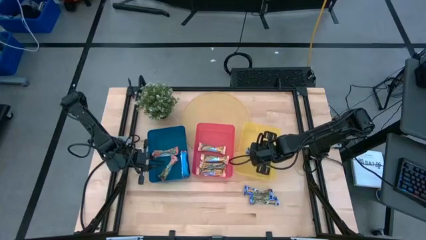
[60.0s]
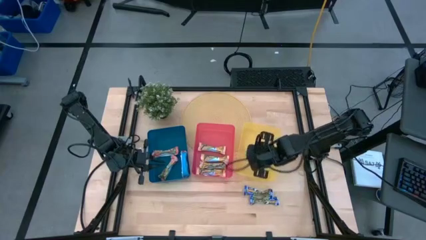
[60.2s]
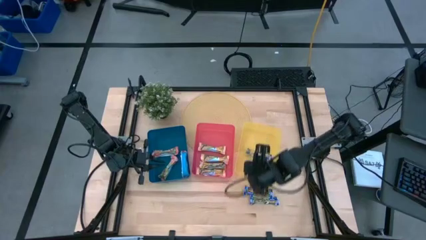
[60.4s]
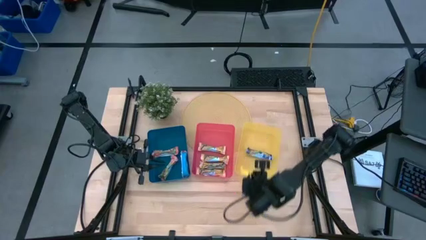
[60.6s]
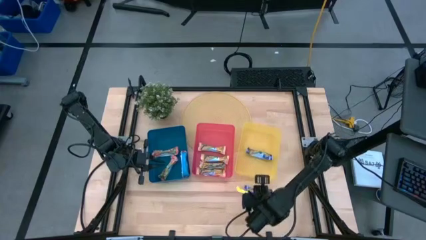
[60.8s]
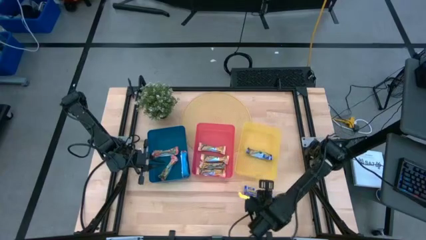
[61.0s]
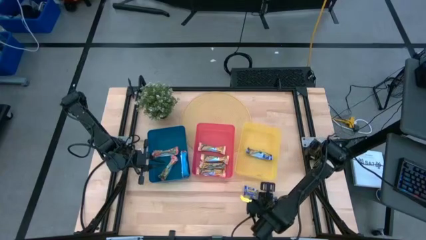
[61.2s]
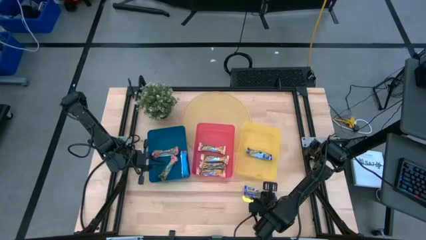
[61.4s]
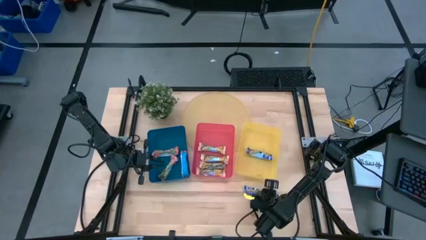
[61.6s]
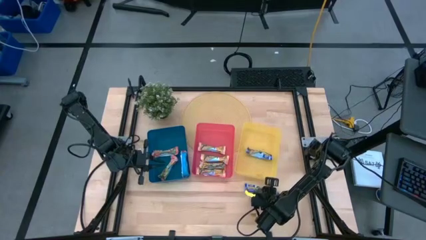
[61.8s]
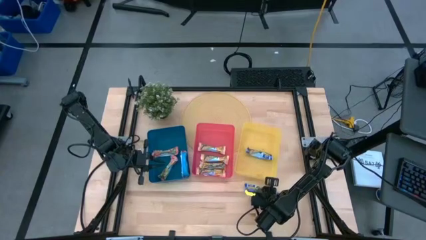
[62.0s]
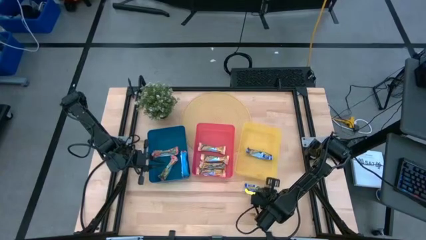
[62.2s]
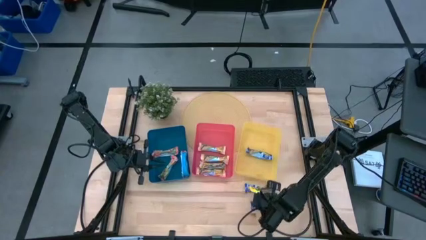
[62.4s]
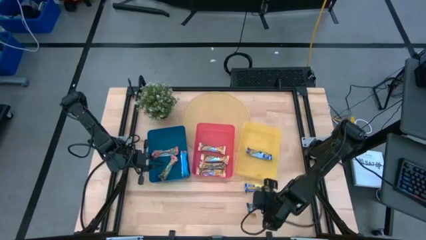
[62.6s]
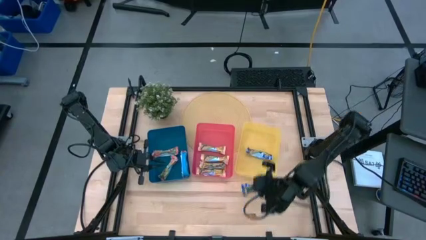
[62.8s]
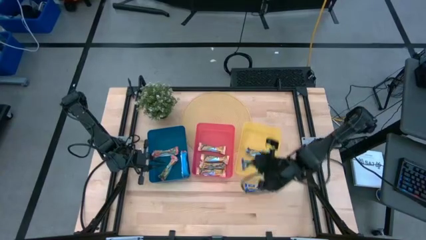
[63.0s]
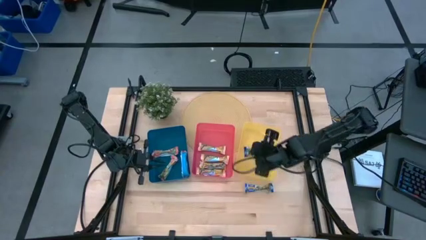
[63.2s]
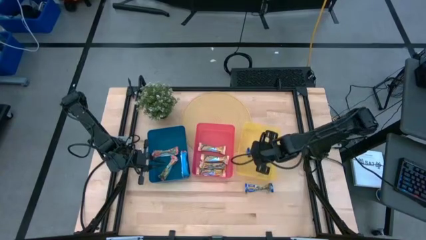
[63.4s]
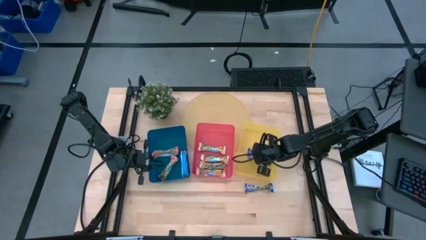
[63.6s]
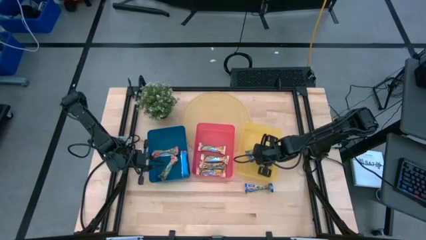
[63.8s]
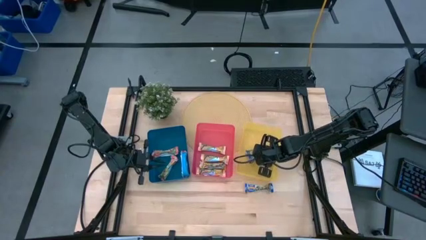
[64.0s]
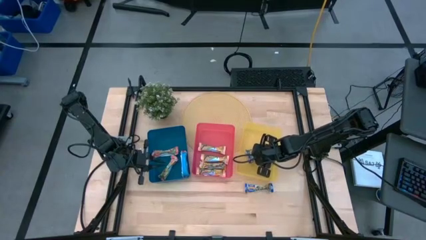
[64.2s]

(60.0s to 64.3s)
Task: Pick and place Granola Bars by type
Put the bottom blue granola bar into the yellow bin

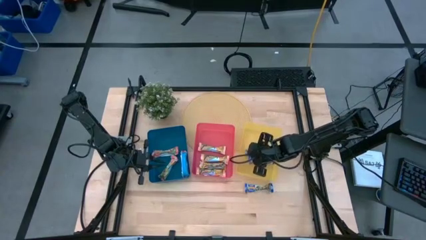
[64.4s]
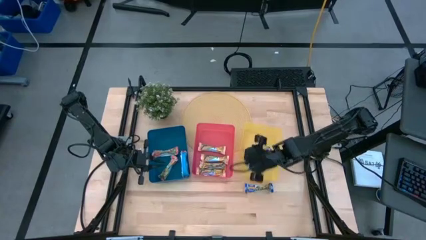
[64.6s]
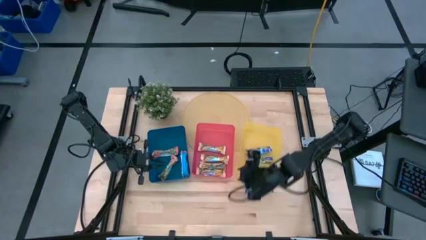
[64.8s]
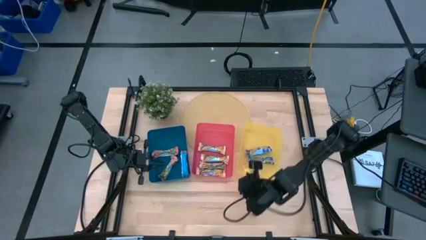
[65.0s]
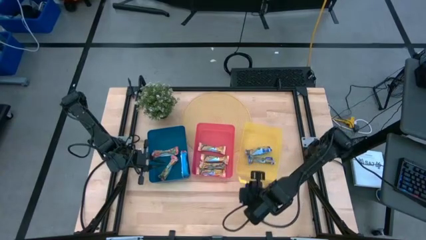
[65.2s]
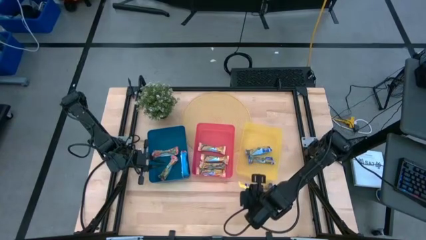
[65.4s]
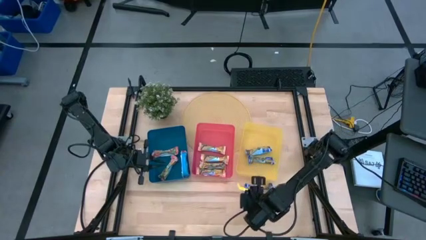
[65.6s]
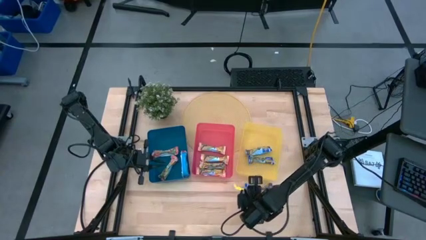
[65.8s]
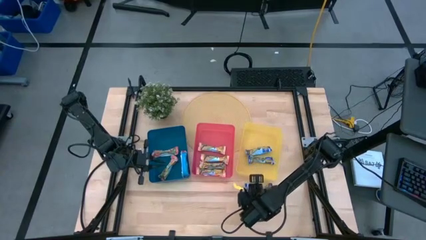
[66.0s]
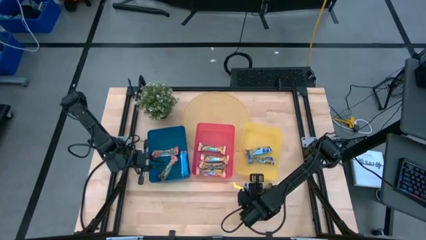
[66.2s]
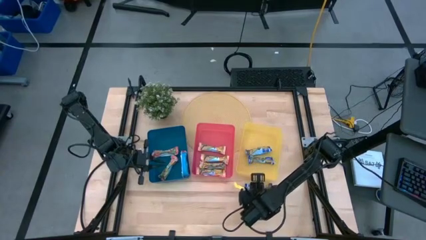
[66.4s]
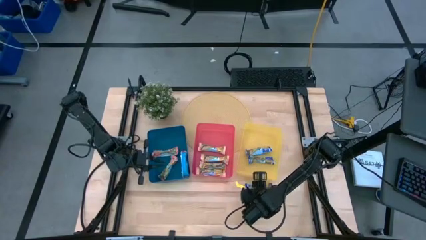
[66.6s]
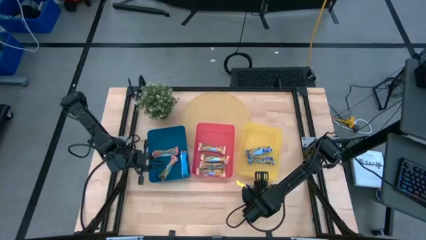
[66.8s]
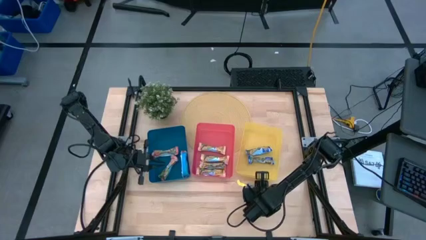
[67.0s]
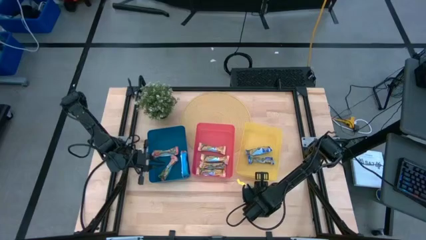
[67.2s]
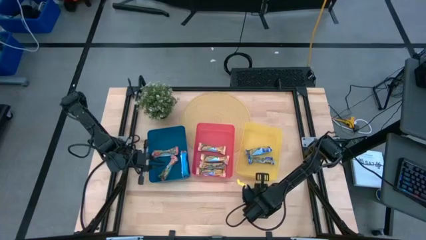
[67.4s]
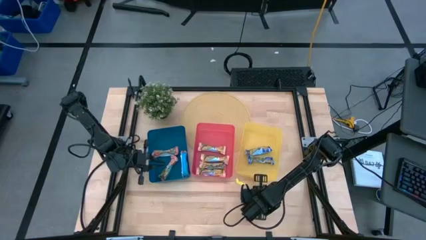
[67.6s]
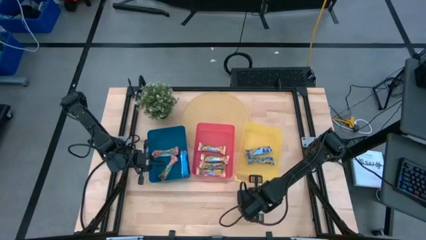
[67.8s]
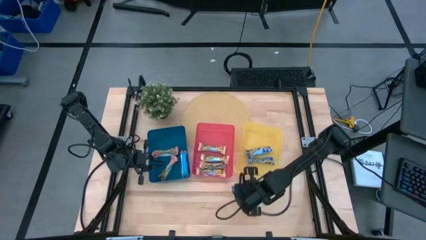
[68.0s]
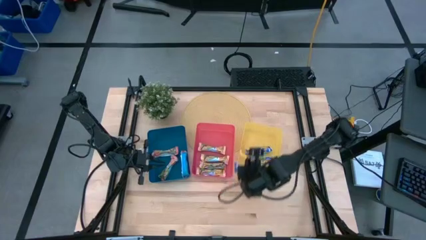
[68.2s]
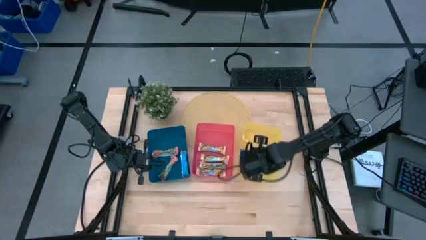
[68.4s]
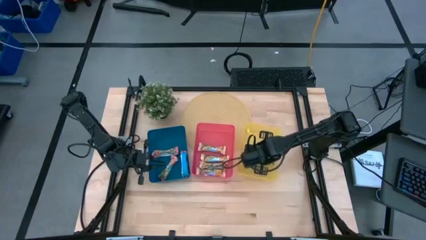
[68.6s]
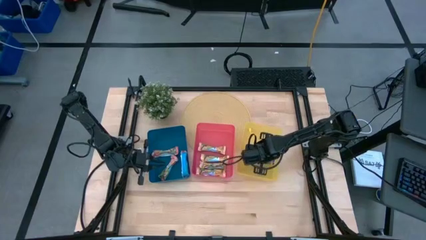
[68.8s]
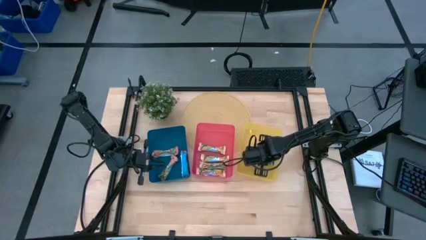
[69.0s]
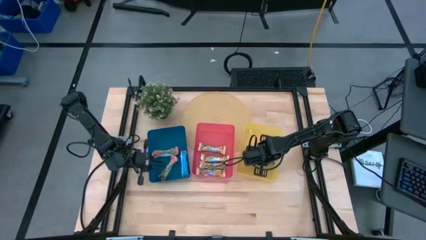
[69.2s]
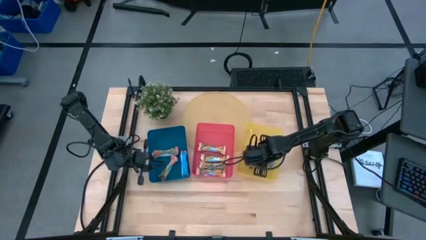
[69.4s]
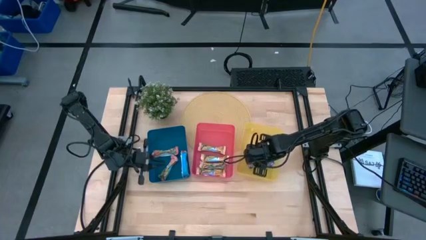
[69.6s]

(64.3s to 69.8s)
Put the blue granola bar into the yellow bin

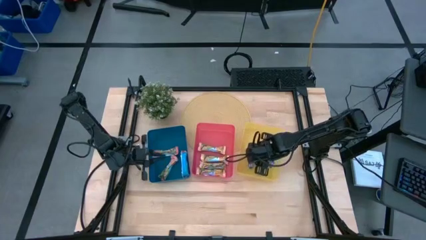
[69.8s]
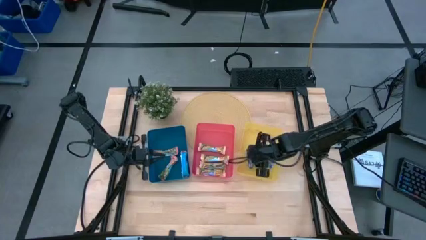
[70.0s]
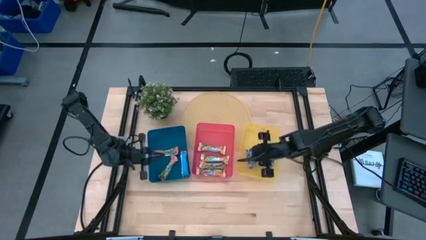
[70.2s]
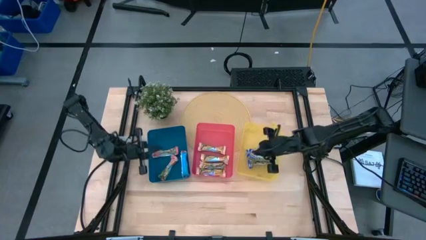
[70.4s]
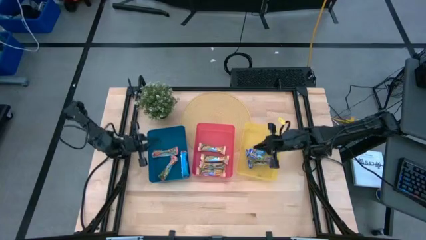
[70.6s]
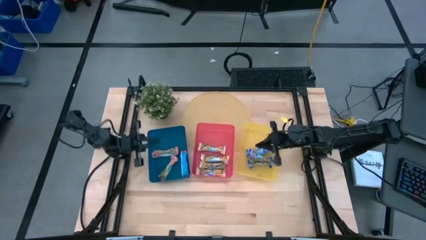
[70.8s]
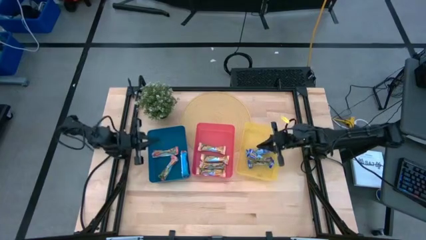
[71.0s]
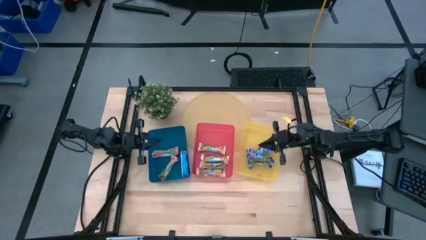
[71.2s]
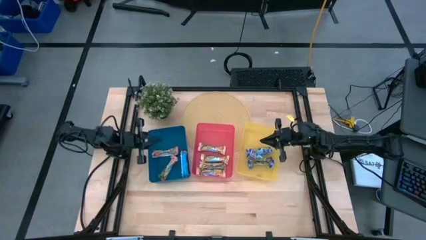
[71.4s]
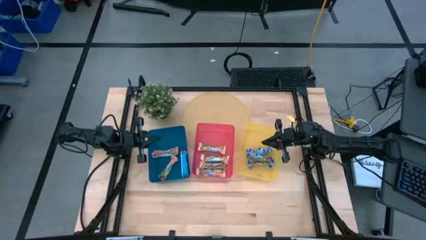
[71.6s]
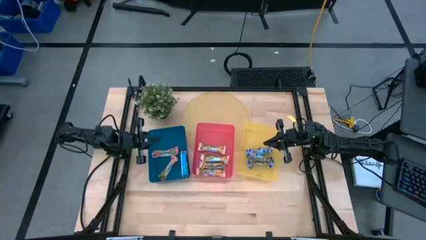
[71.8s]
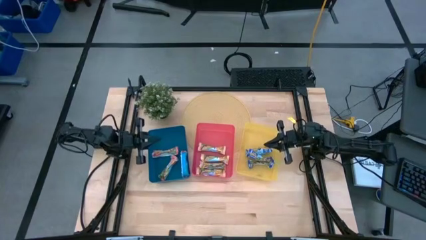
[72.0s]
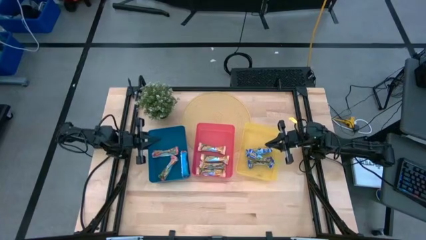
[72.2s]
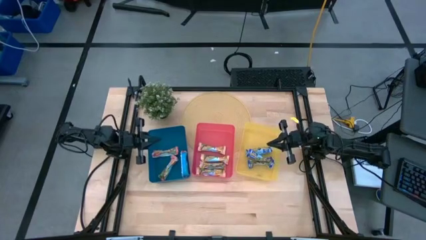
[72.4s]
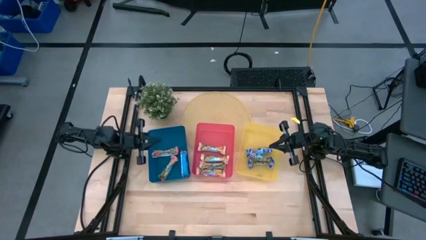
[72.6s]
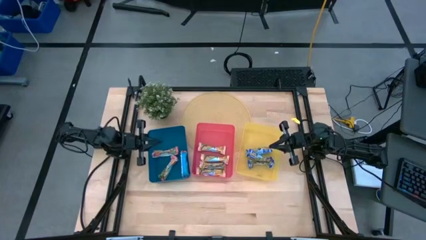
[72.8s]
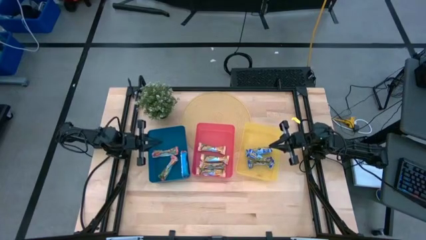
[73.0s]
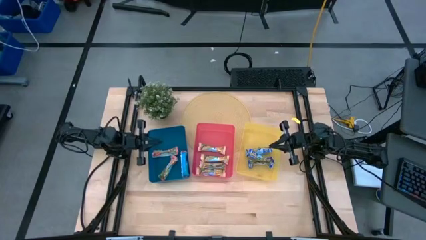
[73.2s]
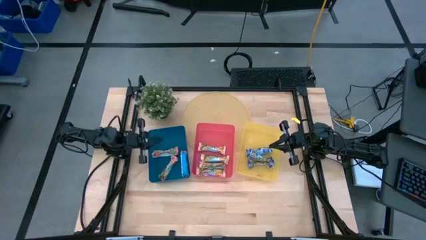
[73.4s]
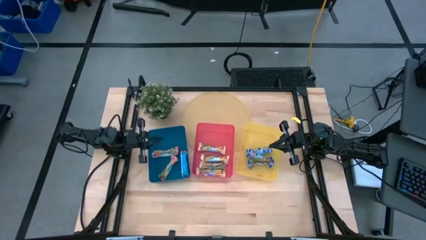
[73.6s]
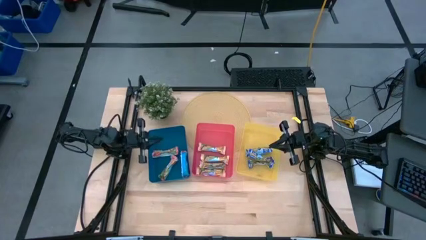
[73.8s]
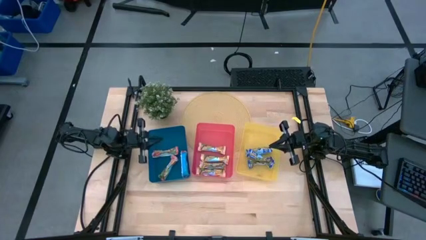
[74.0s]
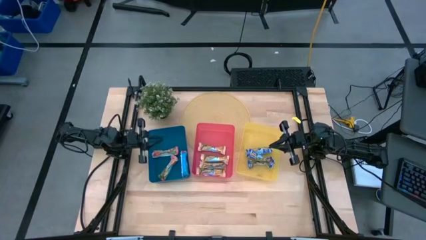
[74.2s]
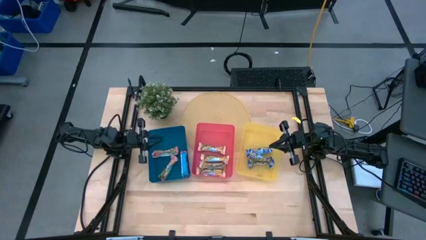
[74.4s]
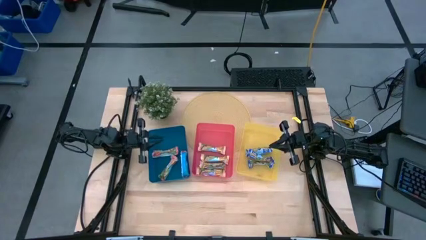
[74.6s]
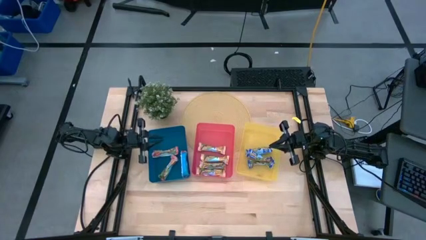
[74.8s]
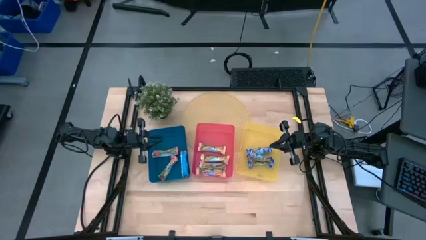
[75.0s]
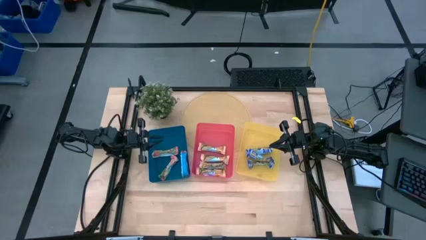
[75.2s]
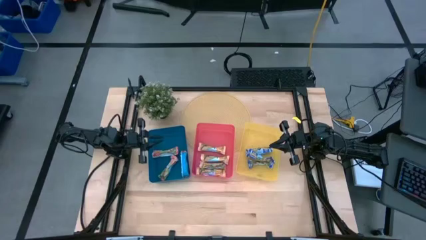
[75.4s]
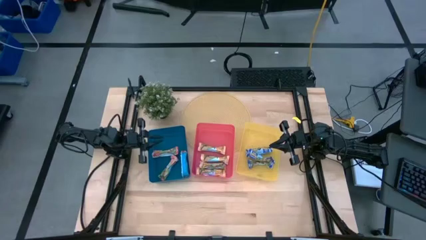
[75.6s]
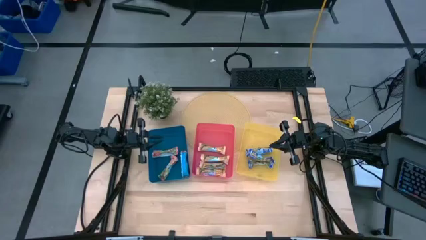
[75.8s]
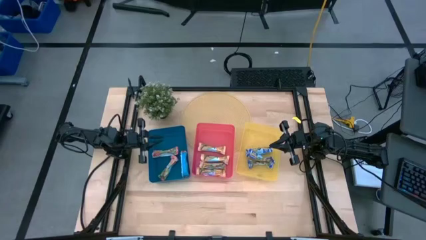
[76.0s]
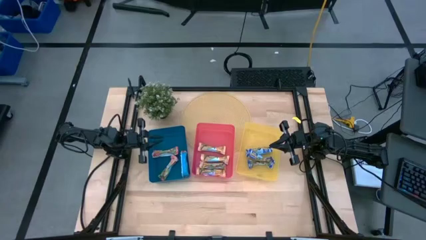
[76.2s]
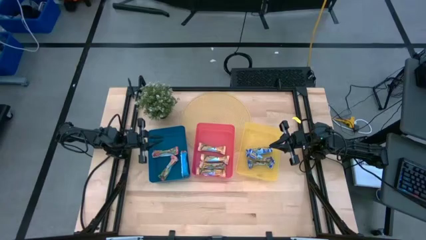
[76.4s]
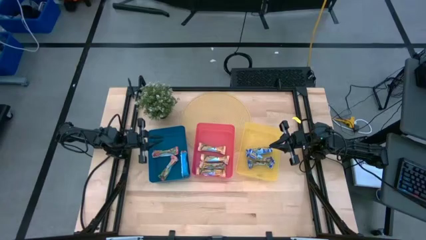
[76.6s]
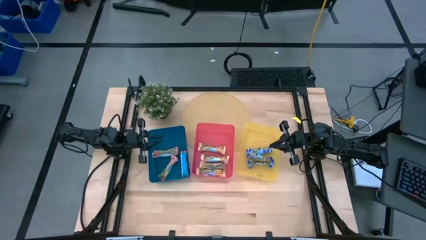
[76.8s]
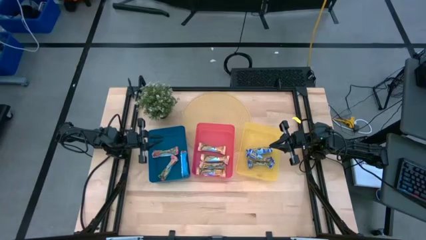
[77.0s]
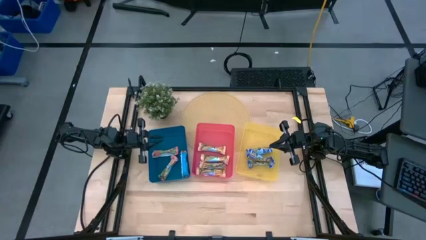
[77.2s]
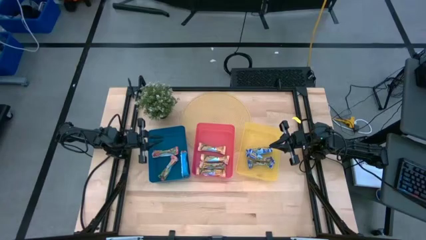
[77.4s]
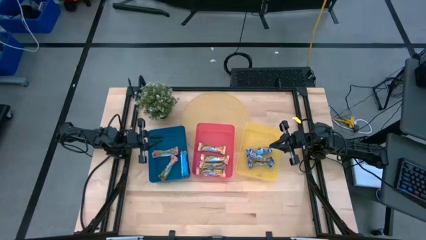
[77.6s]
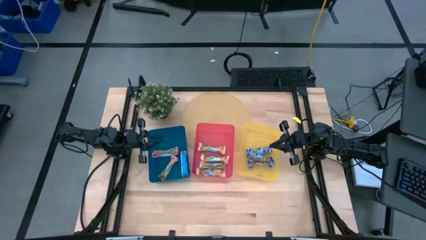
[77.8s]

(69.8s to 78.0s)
Return to Home Position
